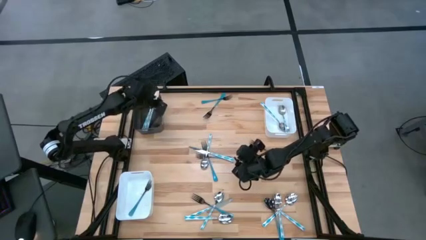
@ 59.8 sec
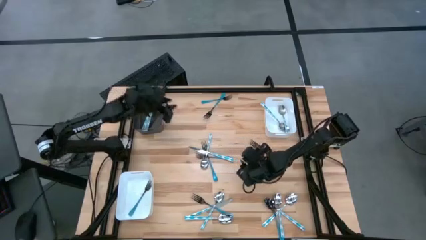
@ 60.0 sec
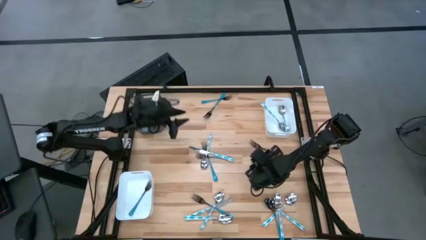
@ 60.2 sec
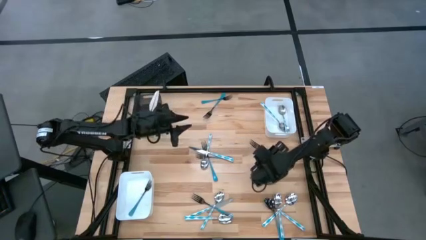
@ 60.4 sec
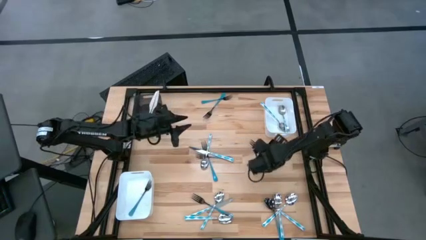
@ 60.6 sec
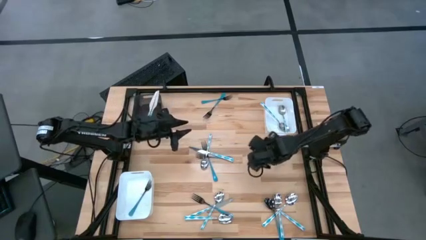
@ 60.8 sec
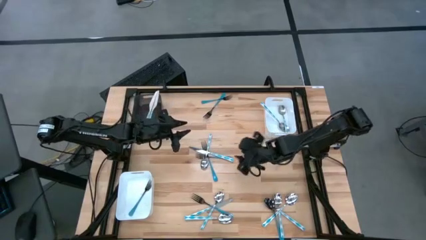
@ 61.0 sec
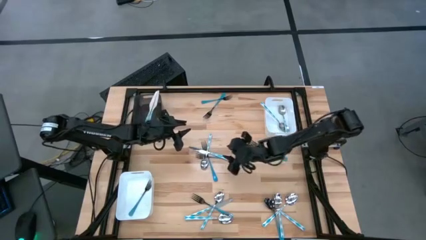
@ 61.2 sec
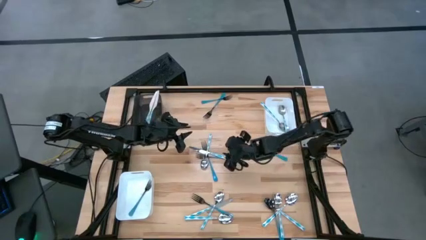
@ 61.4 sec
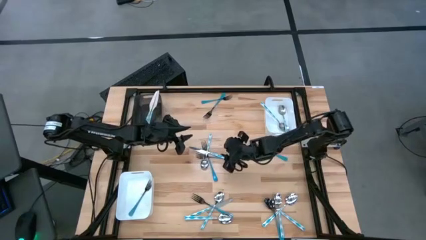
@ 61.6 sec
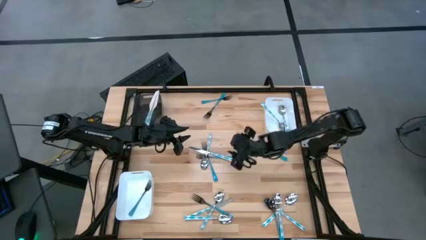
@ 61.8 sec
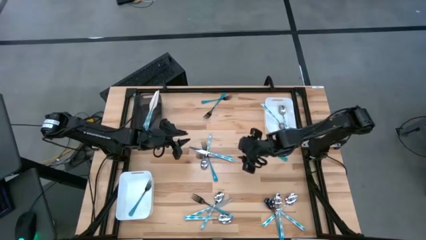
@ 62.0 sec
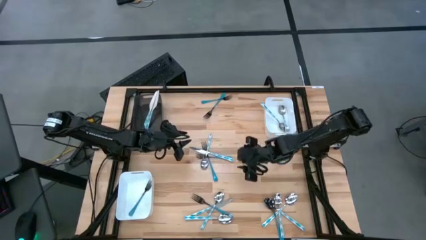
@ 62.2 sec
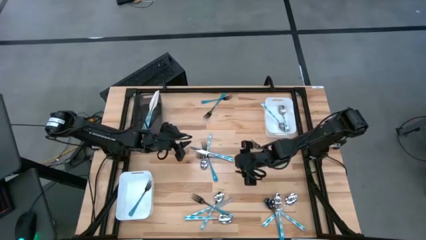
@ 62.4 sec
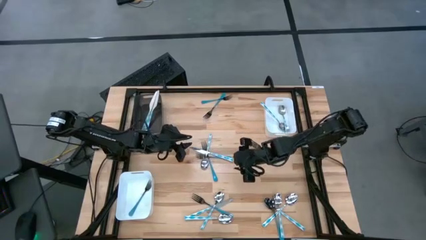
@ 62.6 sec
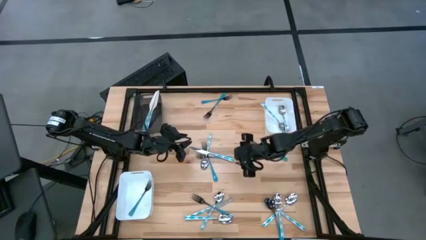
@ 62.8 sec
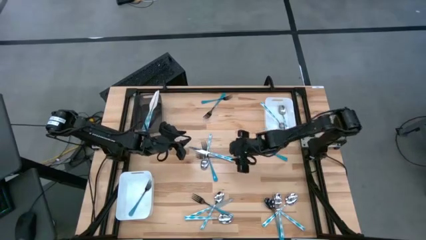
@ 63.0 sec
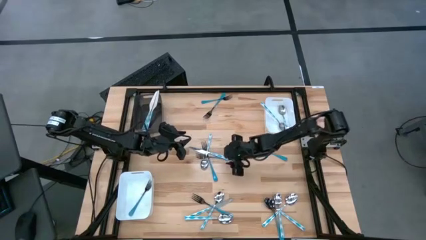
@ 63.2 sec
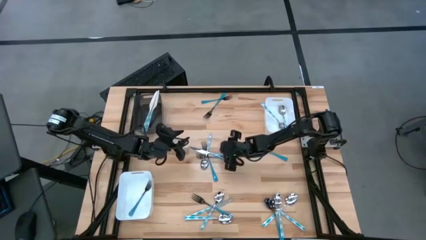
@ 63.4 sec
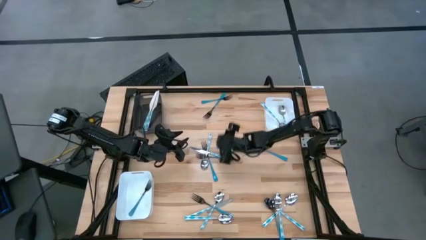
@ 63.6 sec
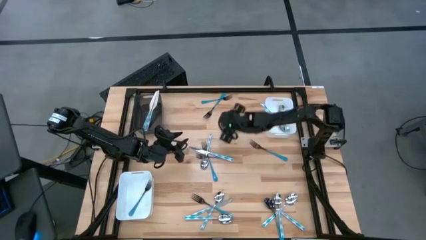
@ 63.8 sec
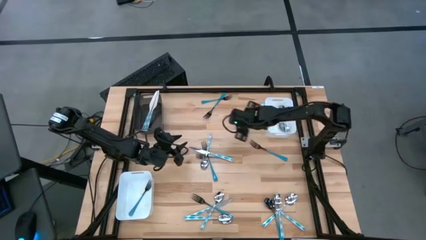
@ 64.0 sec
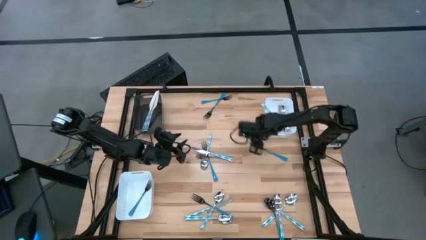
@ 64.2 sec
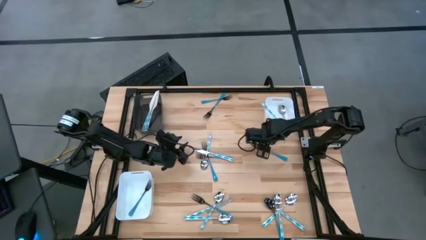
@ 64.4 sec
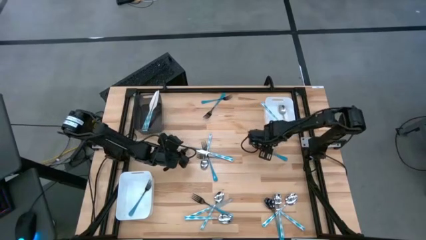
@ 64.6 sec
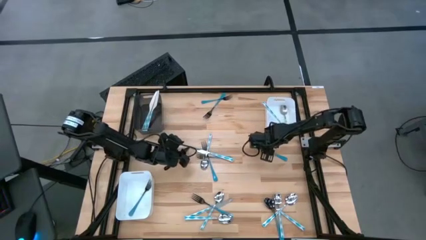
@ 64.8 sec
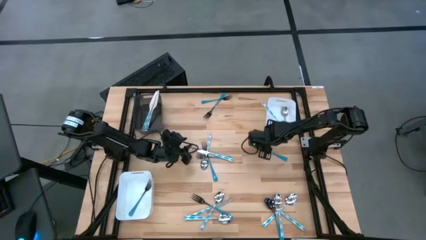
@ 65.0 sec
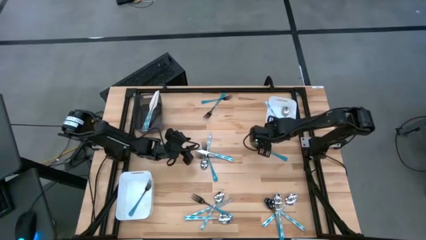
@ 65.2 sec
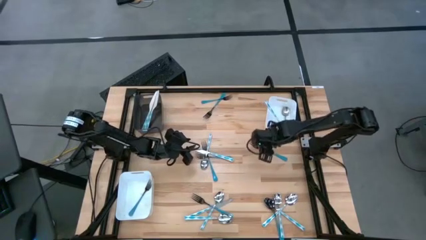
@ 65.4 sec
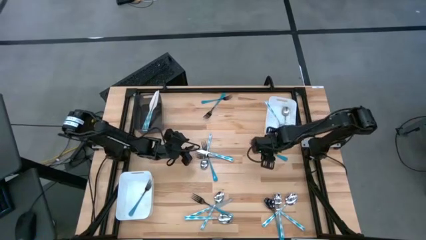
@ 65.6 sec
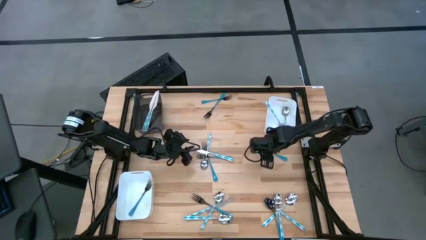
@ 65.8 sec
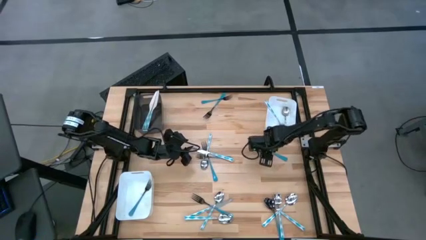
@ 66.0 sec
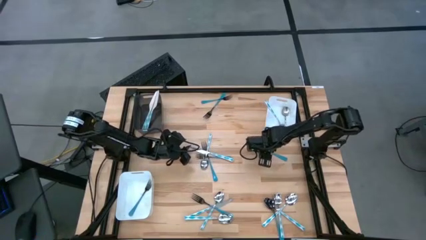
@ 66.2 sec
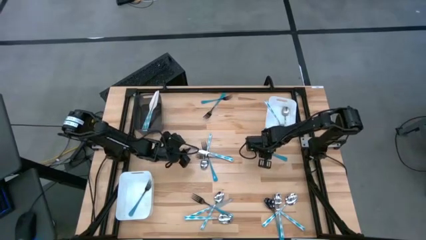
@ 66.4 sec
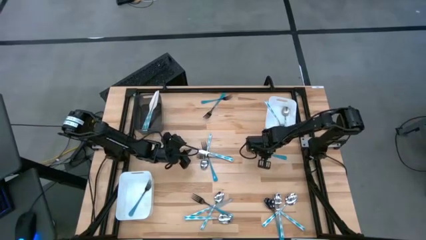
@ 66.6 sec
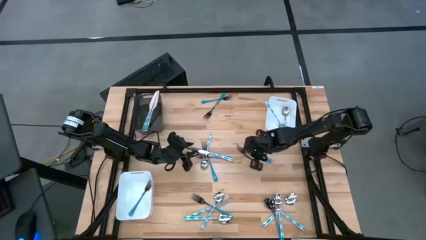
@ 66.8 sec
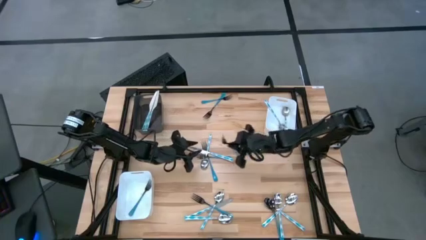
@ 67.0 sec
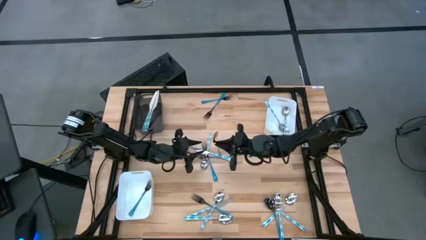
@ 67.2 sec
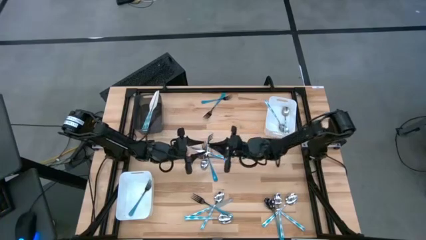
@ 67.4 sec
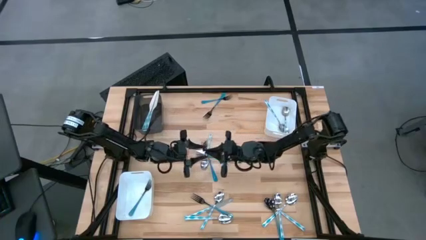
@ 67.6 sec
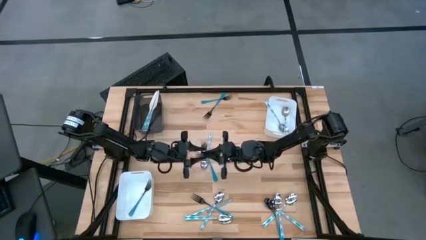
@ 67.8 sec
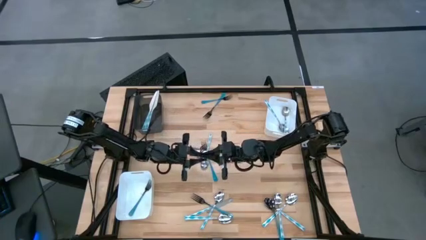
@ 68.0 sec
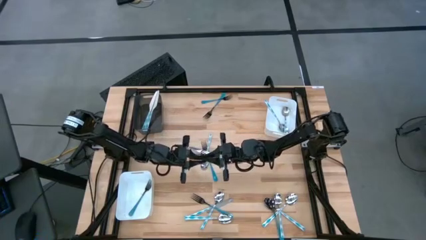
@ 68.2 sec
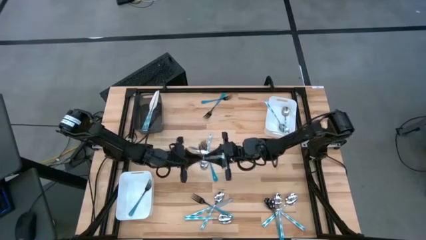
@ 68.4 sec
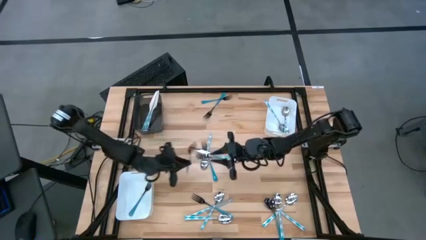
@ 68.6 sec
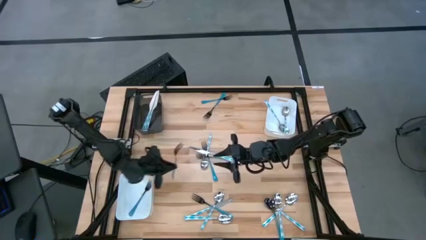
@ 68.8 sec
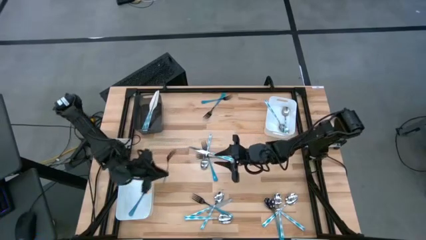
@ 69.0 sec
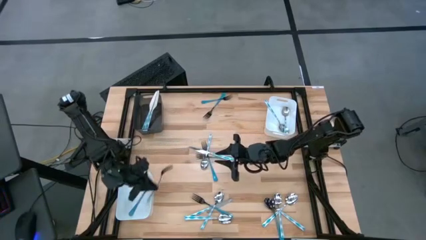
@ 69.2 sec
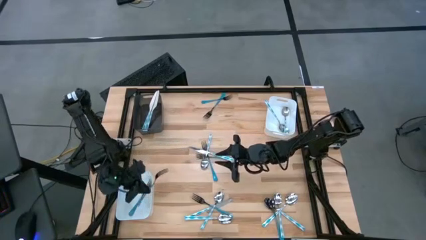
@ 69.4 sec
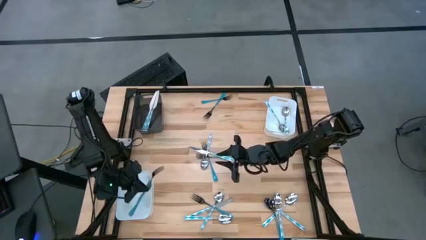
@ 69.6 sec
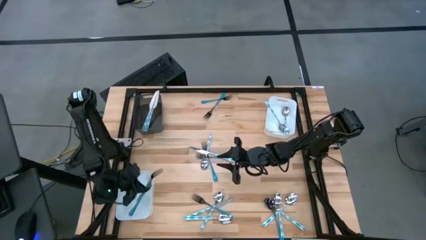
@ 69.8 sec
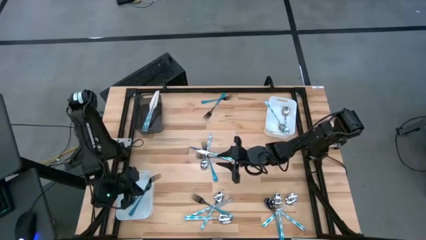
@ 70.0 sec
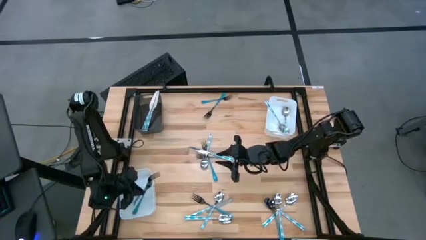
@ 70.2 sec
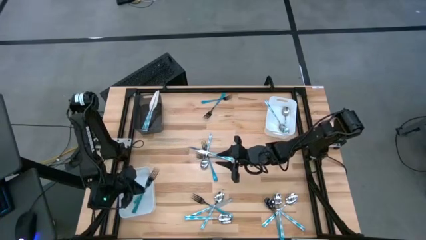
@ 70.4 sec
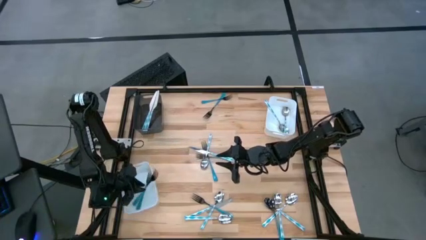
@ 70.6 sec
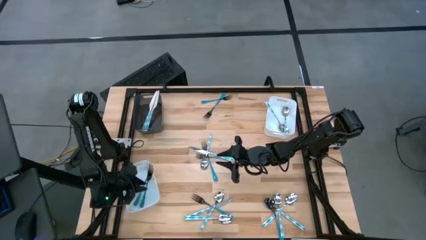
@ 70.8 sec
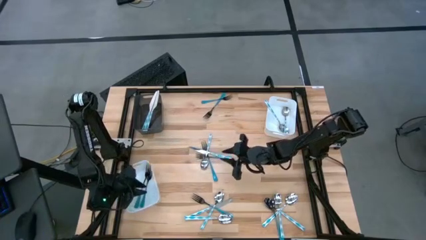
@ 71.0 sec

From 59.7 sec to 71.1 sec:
Task: Sort silverware by color (type)
Put the blue fork into the left white bin

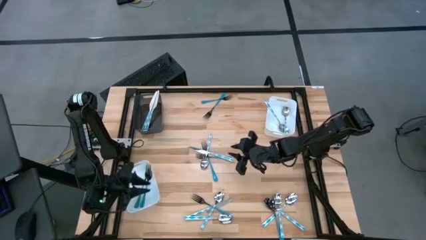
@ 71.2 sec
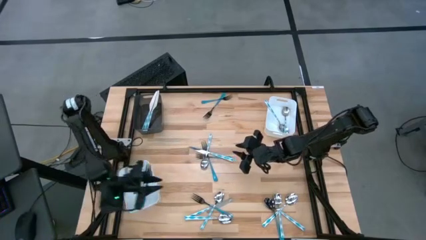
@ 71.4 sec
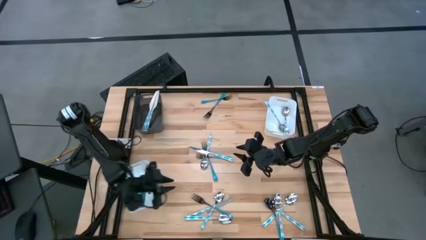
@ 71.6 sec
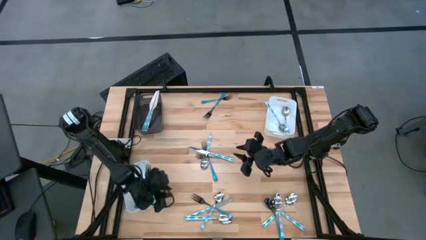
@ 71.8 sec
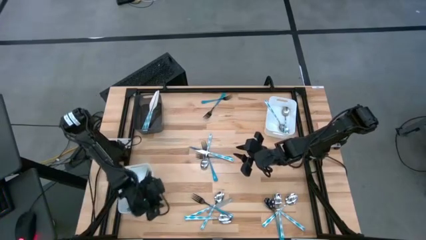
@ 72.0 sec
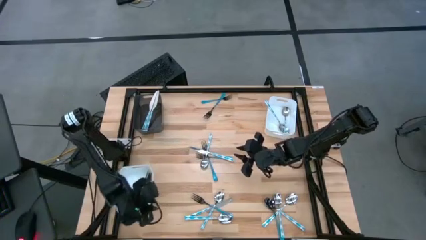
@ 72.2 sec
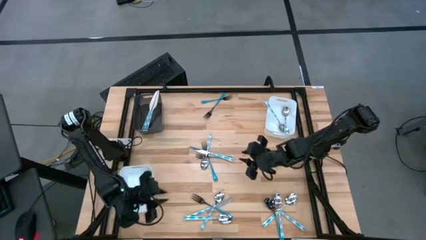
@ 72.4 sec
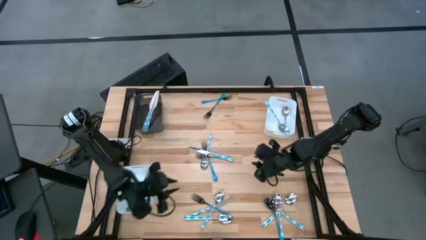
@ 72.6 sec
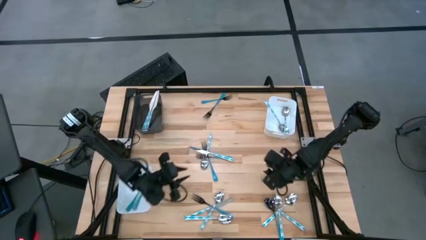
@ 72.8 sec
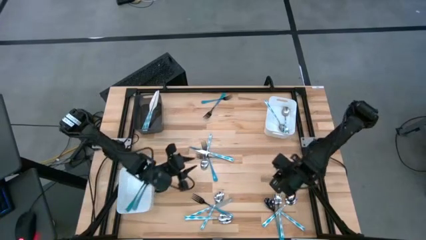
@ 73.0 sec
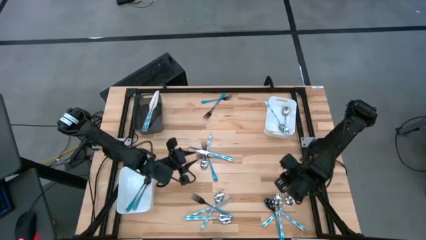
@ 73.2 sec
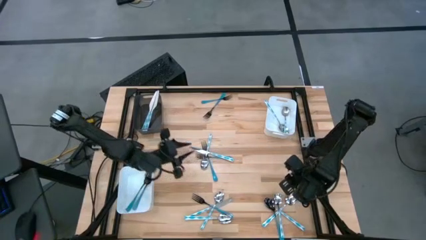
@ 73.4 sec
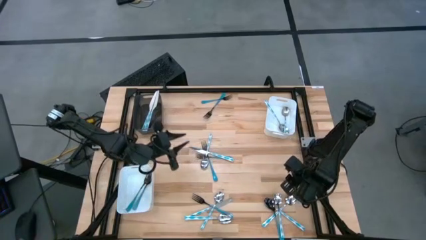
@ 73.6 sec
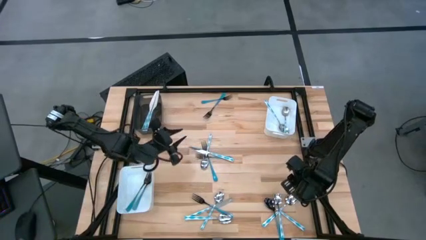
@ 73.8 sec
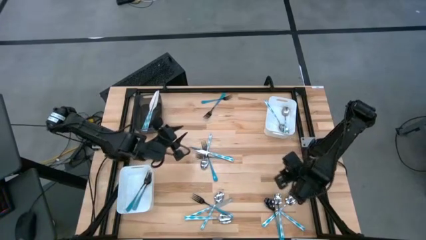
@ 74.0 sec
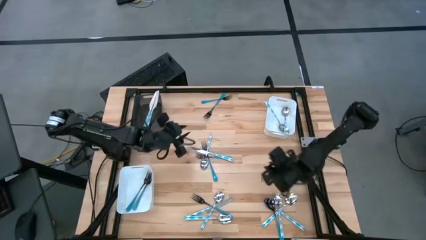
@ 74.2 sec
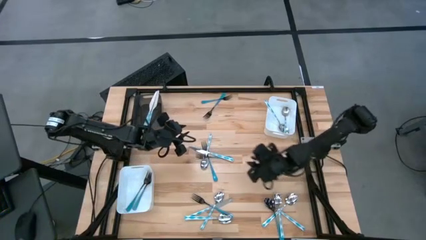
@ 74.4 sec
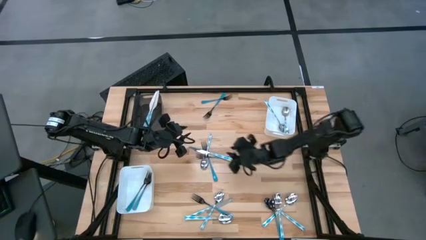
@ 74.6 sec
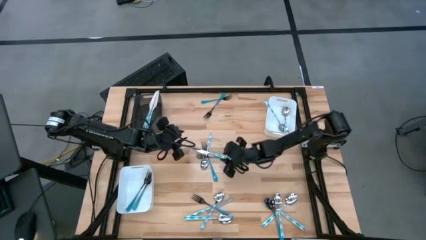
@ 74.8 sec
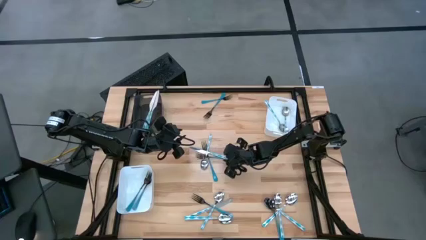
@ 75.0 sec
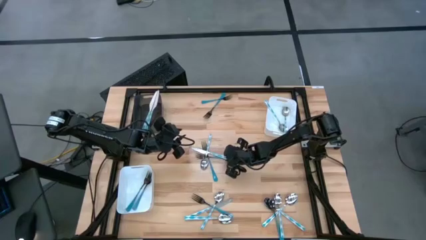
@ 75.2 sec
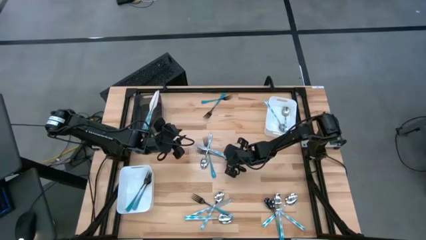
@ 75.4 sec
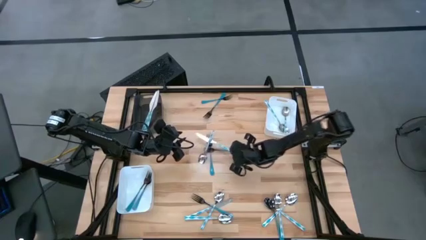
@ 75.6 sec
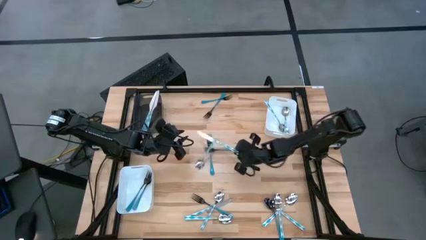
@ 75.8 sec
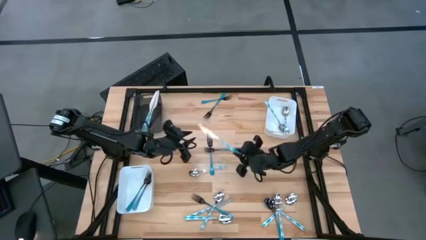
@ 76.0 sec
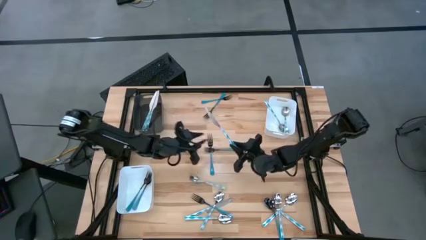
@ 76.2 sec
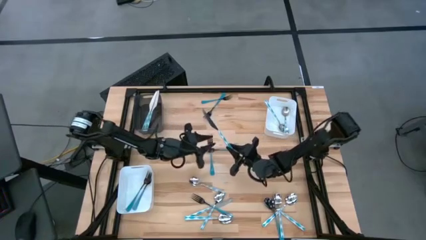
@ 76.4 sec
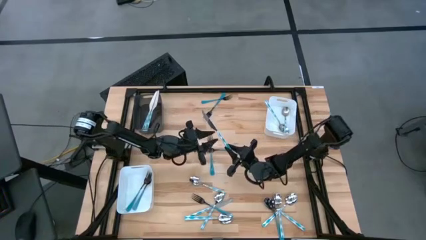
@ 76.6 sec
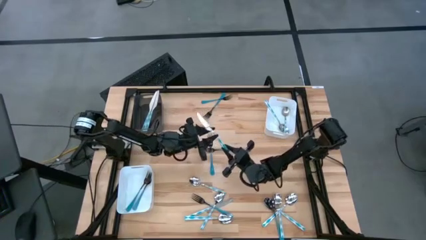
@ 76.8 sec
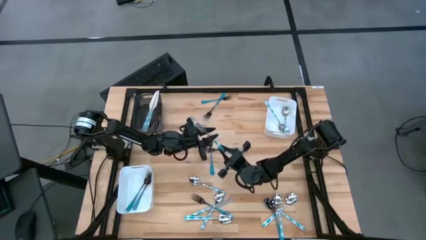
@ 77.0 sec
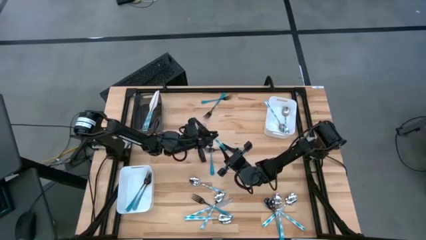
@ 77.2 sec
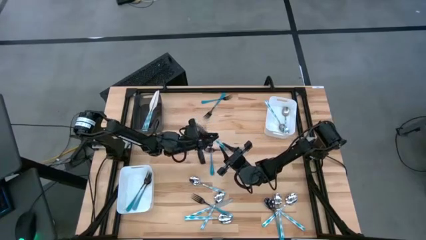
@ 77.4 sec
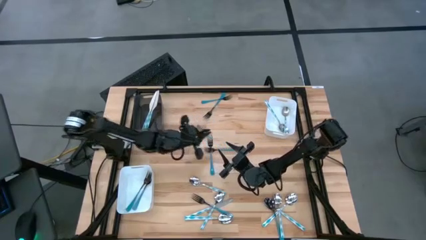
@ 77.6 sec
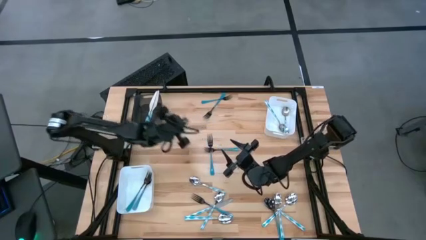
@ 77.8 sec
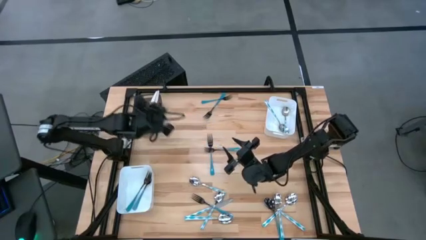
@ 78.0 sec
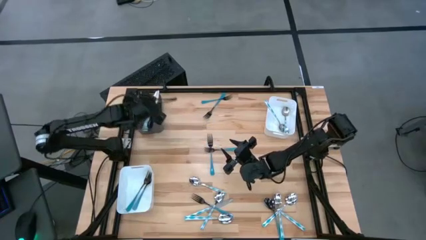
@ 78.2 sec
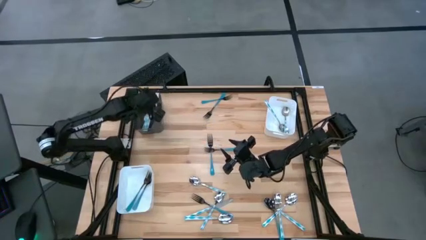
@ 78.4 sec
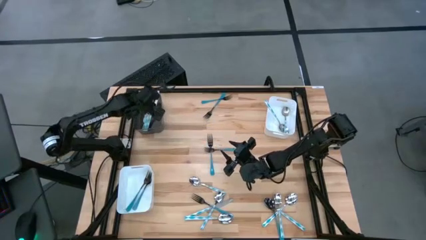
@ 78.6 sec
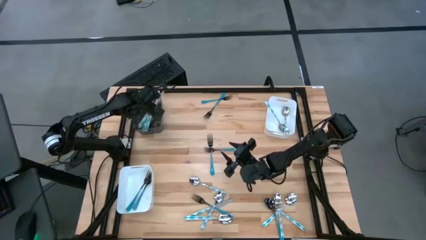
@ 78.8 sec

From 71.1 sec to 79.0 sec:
Put the blue white knife into the black bin
